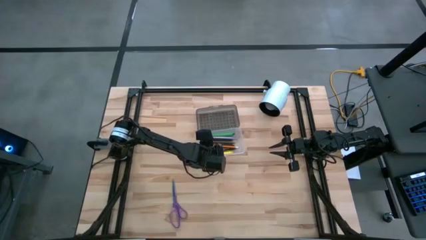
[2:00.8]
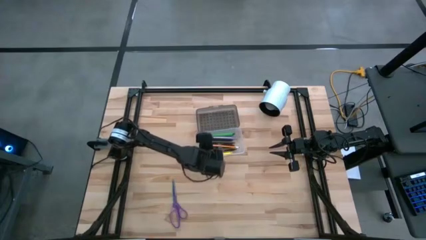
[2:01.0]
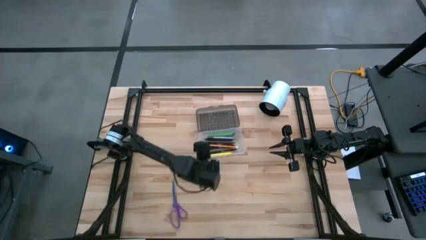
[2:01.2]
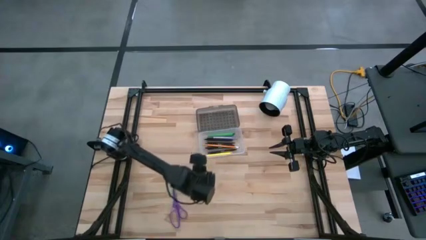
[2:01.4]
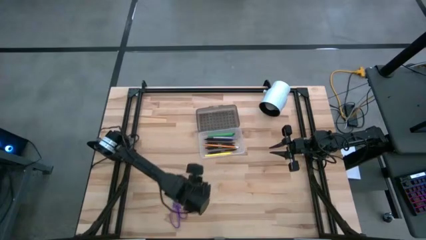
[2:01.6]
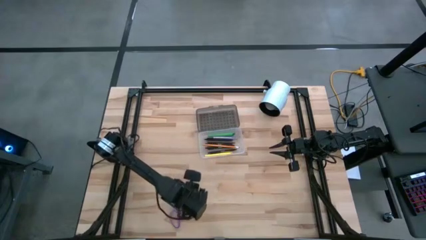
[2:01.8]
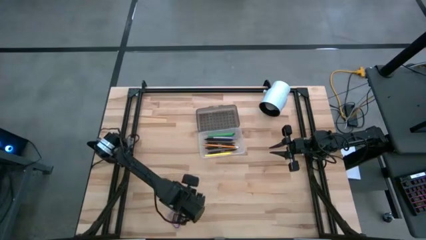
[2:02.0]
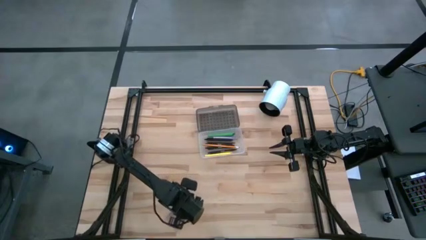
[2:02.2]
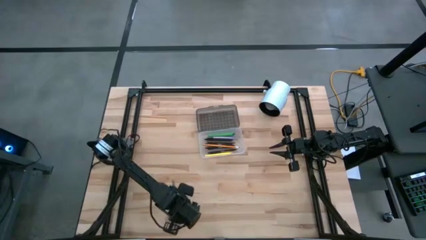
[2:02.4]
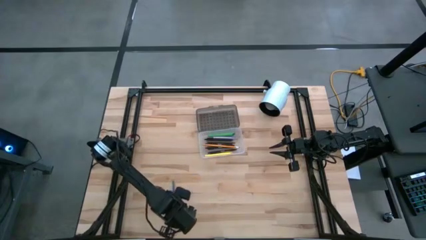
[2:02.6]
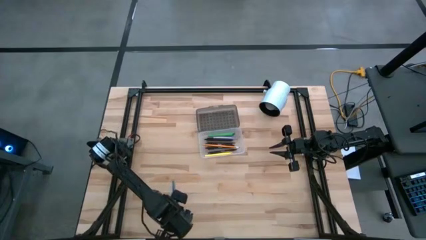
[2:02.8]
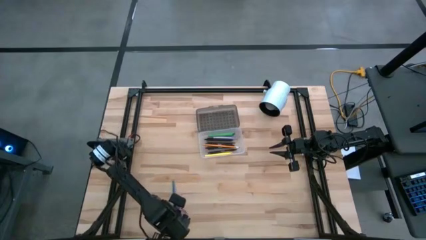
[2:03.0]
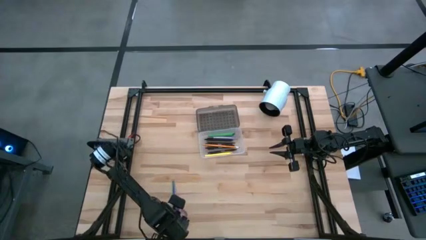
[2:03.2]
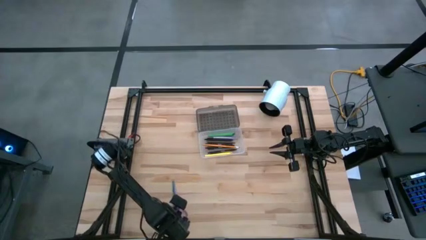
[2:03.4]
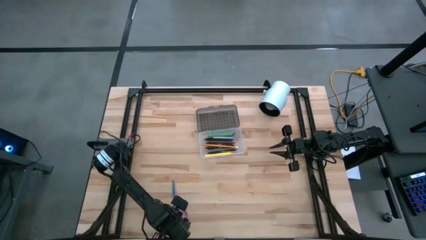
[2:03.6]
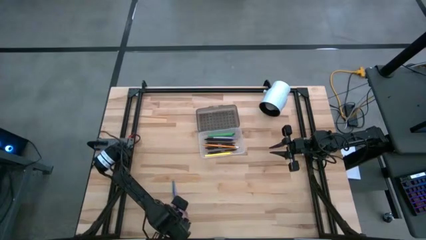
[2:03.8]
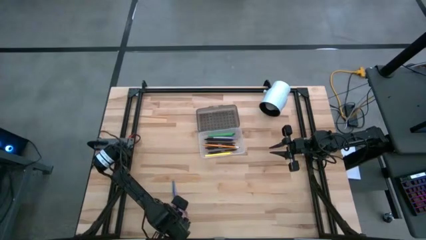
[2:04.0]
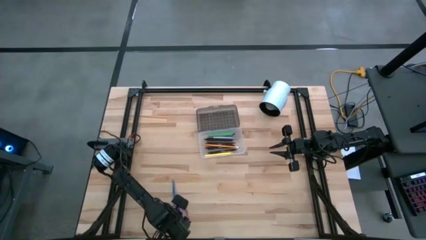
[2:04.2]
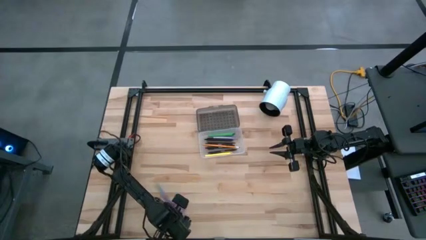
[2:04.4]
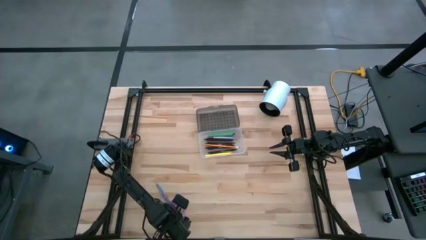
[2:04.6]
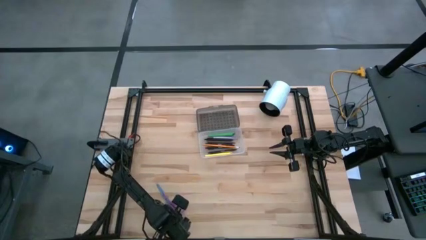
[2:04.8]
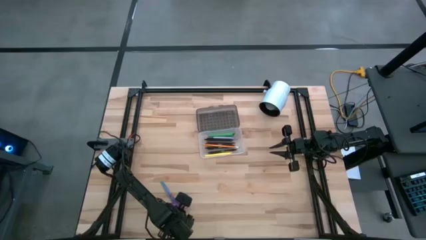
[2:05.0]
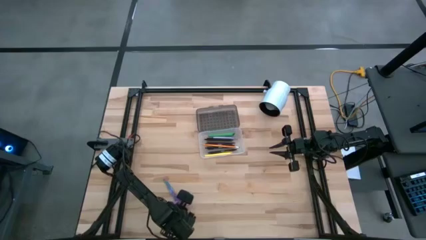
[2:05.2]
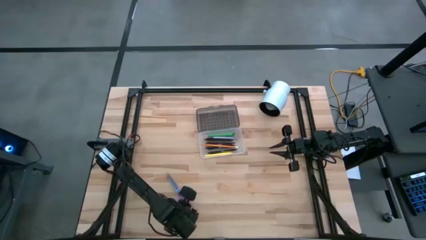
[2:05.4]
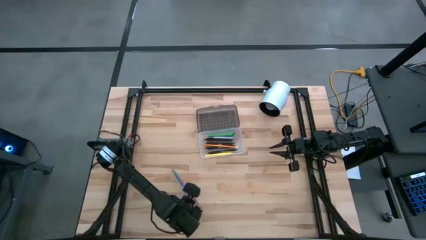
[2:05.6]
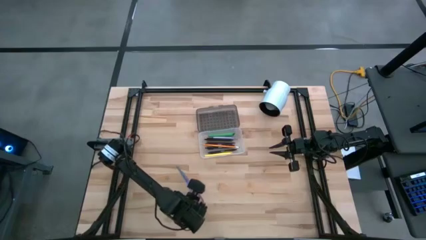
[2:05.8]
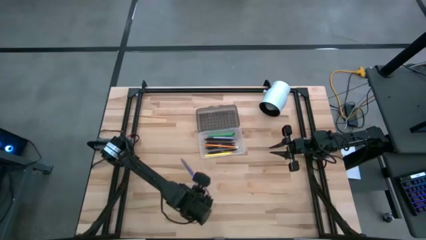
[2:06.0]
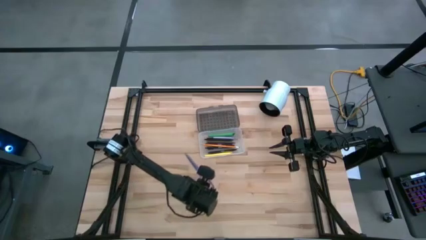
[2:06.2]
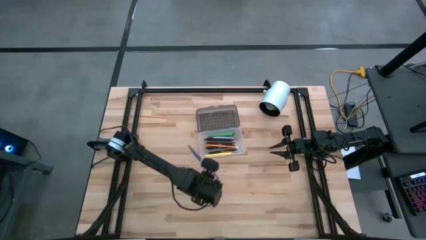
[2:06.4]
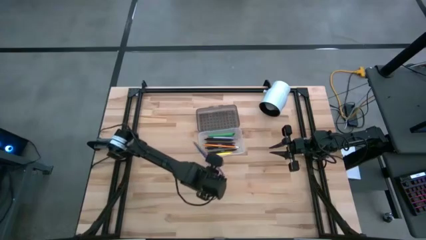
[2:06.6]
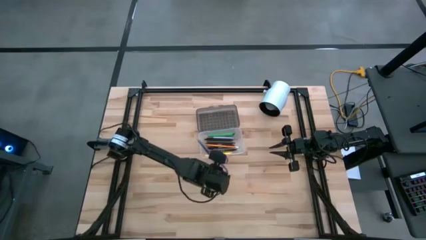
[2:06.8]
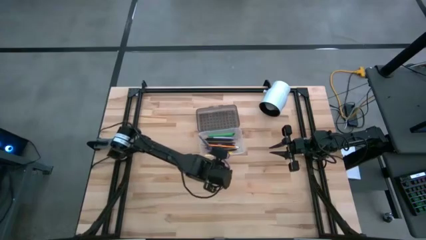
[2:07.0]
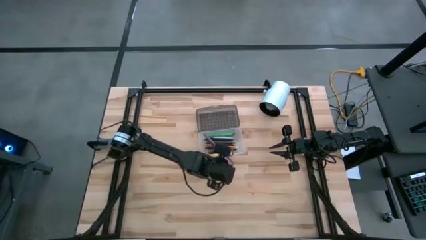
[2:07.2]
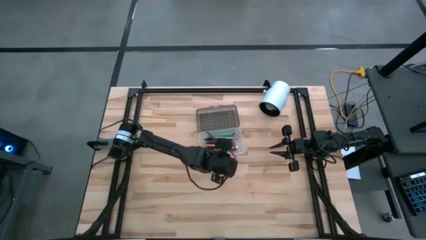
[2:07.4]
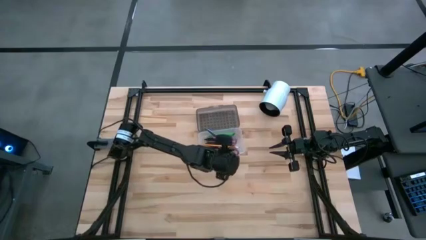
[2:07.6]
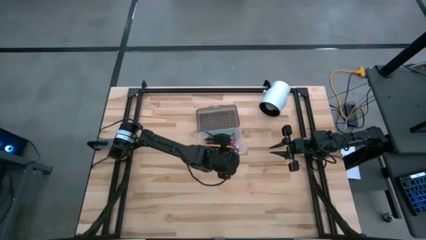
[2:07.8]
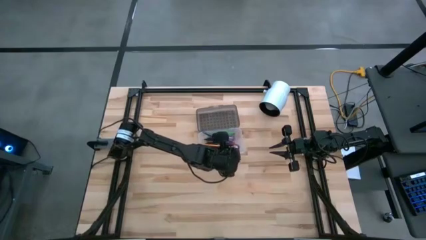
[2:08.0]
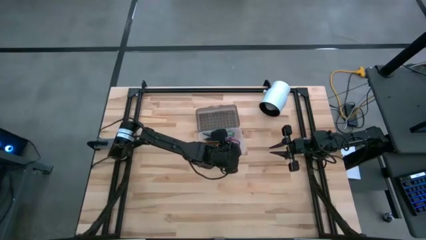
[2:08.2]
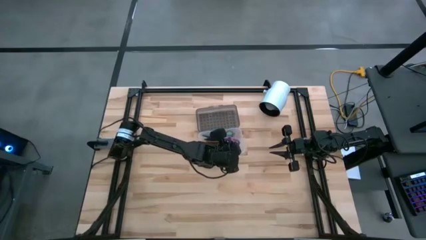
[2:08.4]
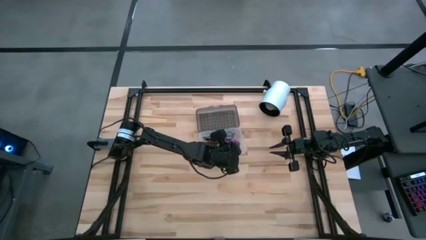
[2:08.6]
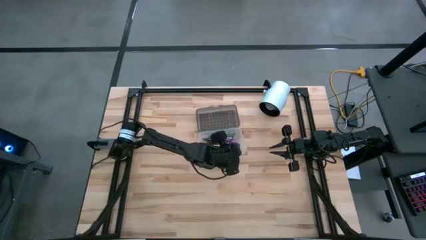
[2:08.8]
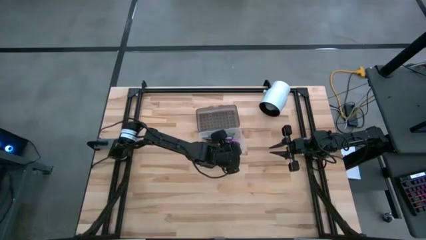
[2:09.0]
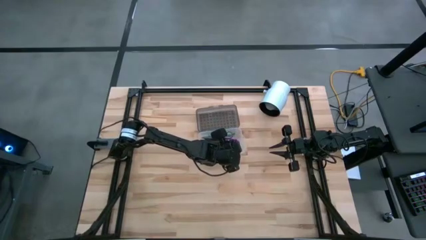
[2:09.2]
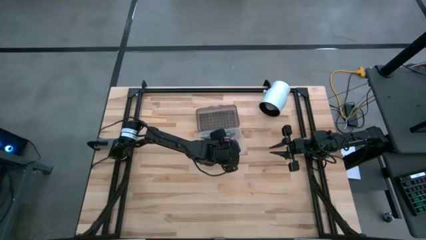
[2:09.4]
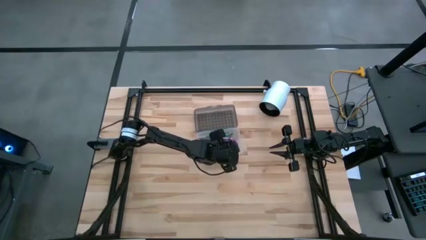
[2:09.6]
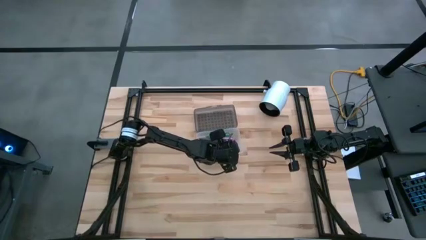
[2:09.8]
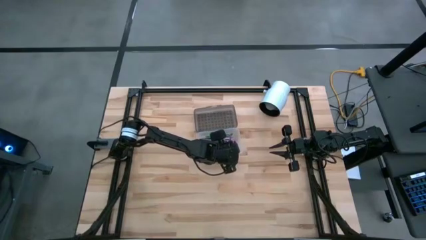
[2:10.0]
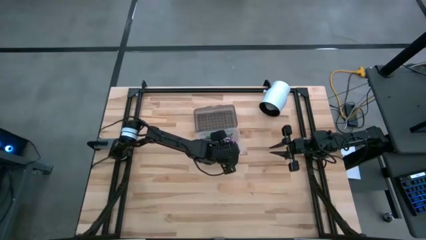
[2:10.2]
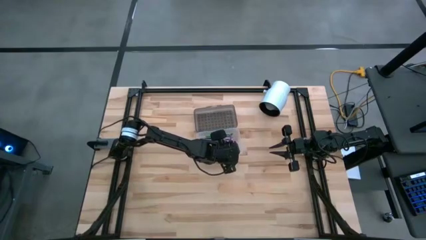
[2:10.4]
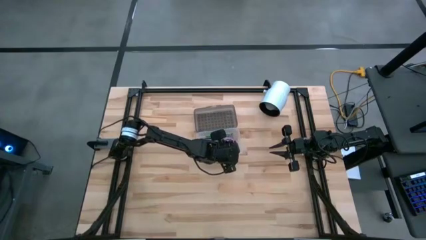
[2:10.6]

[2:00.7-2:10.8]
Task: Pick & place school supplies into a supply box
Put the purple scissors into the transparent supply box

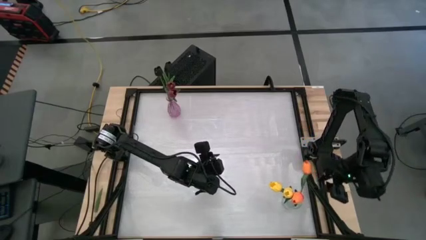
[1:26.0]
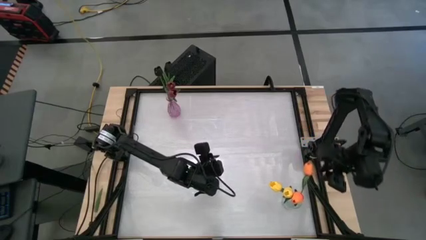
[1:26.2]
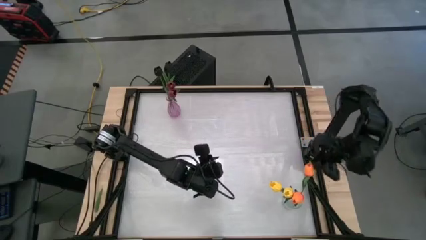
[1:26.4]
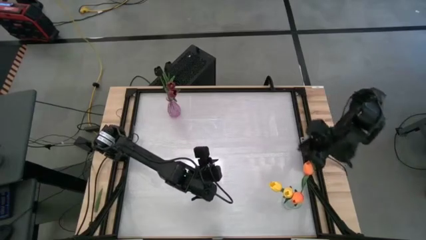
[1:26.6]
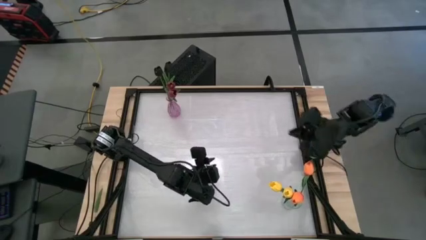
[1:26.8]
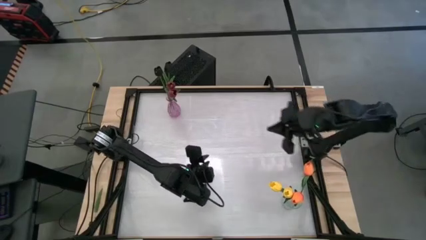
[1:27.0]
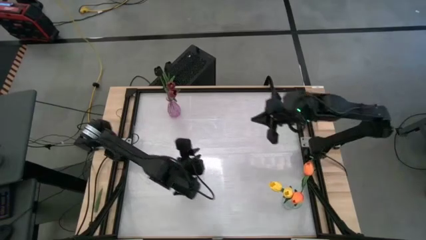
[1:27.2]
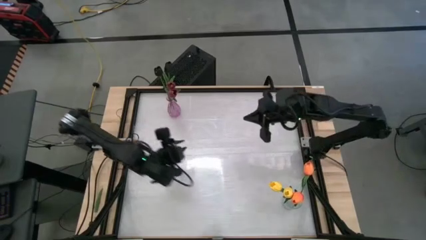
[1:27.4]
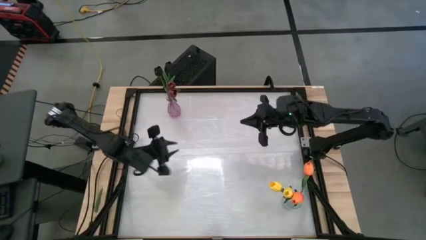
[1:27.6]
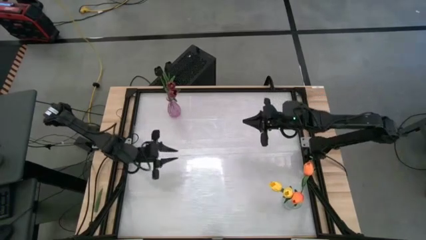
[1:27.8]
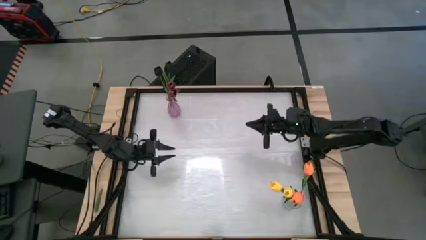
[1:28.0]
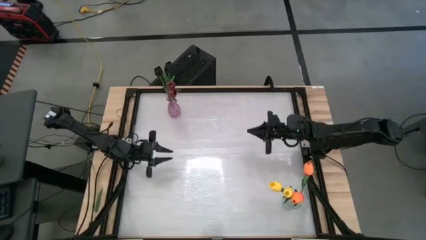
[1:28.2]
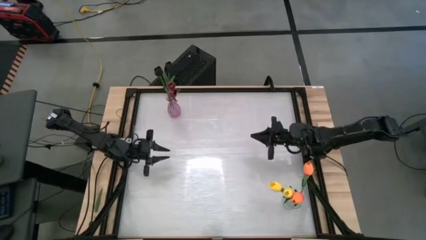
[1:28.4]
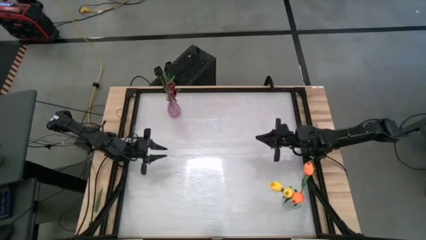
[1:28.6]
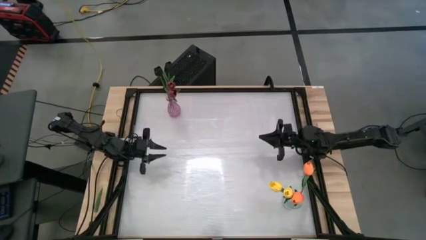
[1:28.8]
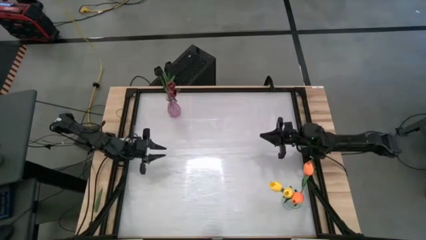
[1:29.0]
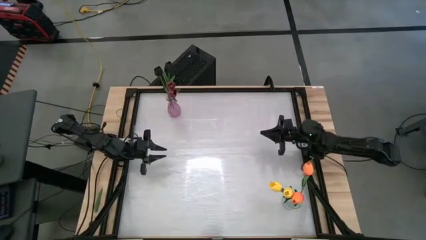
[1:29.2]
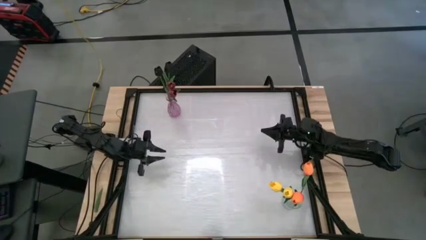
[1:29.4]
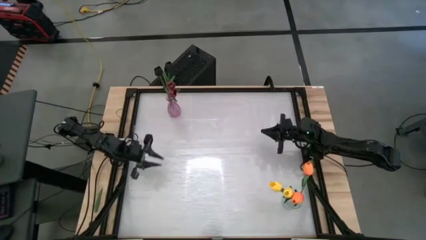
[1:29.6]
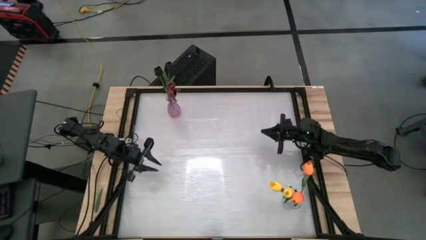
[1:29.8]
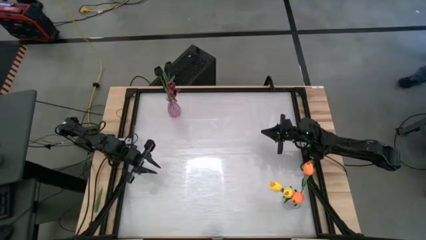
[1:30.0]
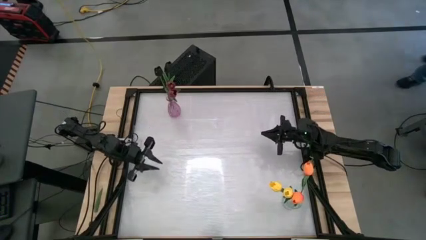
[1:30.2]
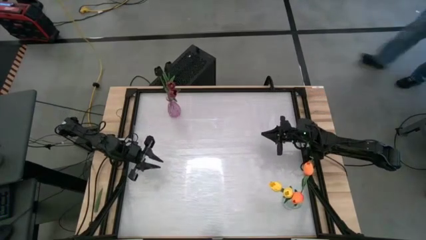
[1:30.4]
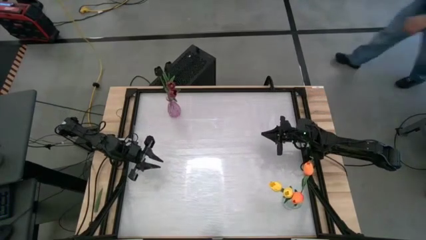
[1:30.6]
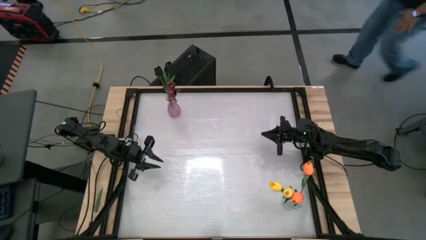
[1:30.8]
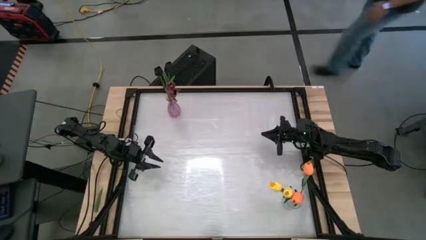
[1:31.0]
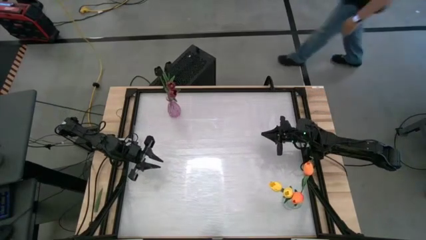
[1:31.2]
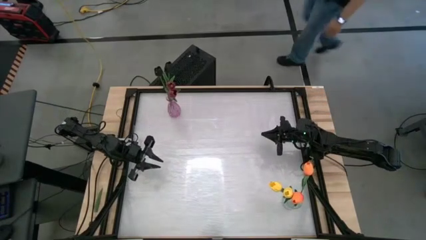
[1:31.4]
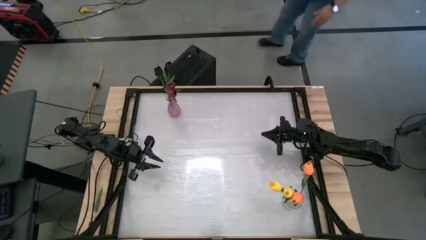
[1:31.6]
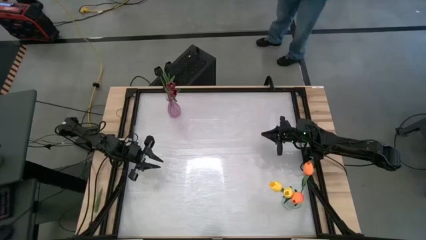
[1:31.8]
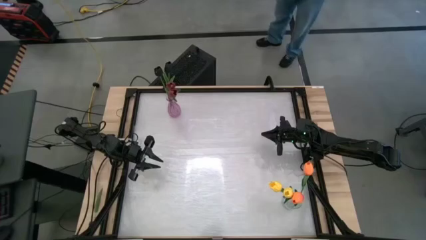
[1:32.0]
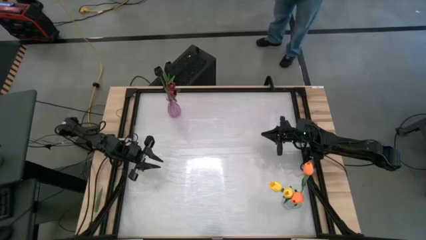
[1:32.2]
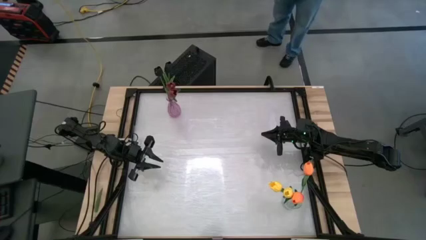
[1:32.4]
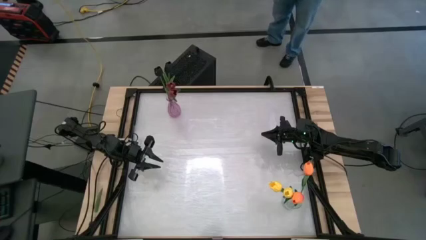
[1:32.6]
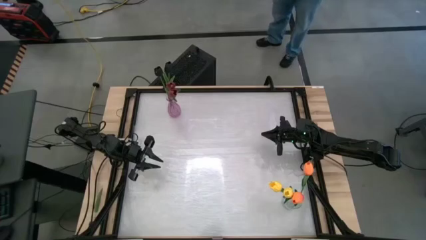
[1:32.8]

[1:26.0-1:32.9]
Task: Sort flowers into vase by color
Return to Home Position
